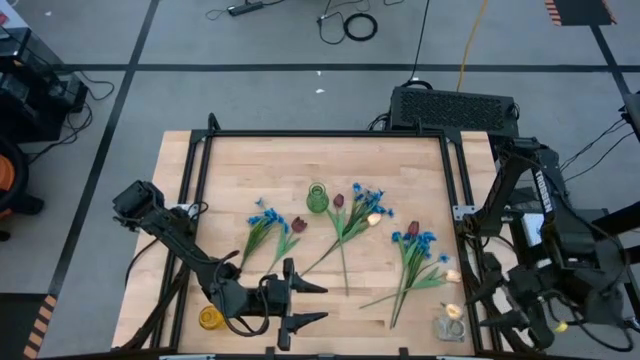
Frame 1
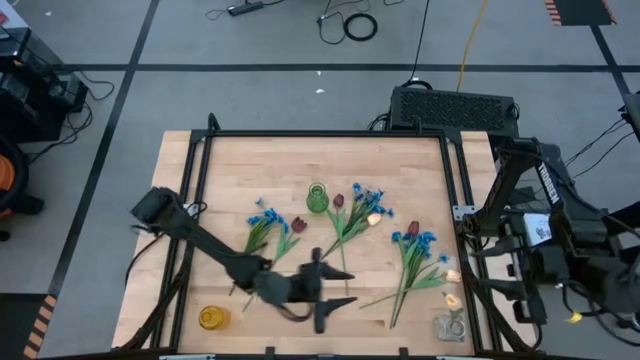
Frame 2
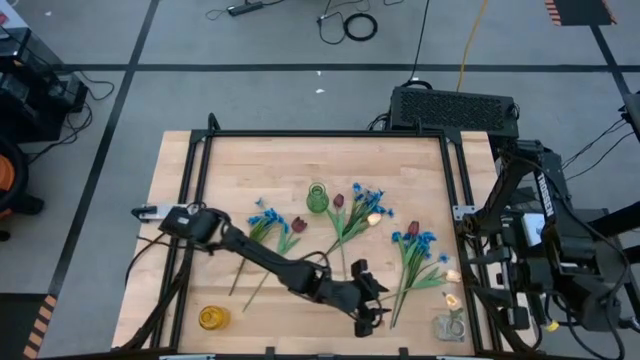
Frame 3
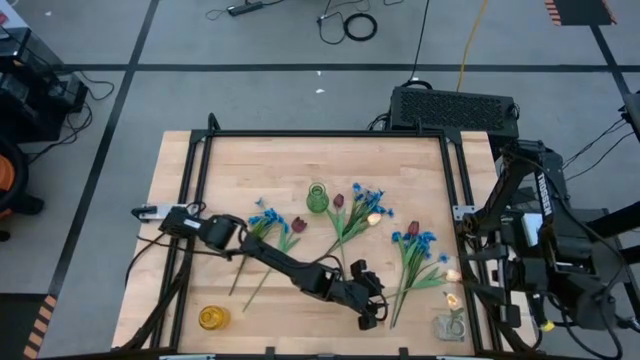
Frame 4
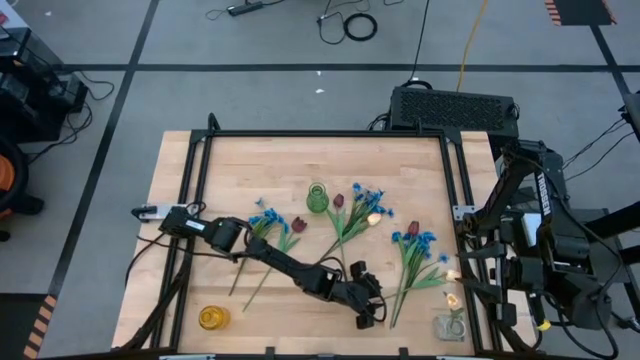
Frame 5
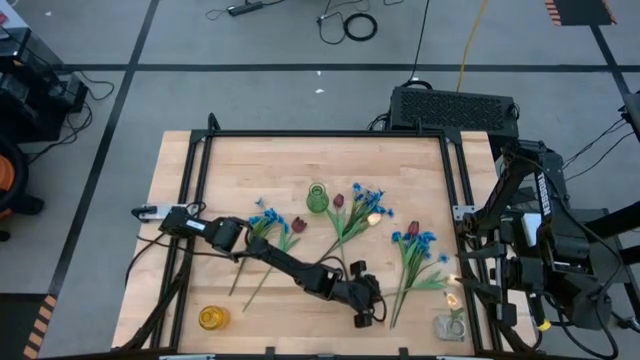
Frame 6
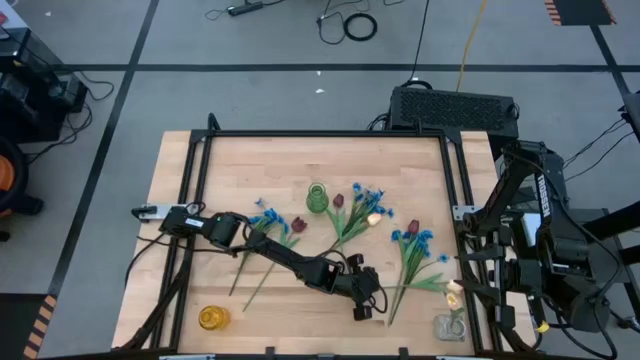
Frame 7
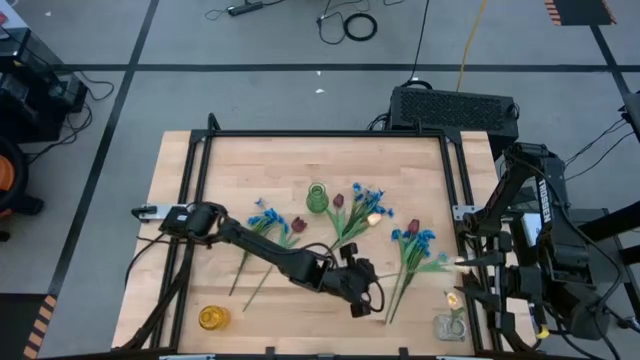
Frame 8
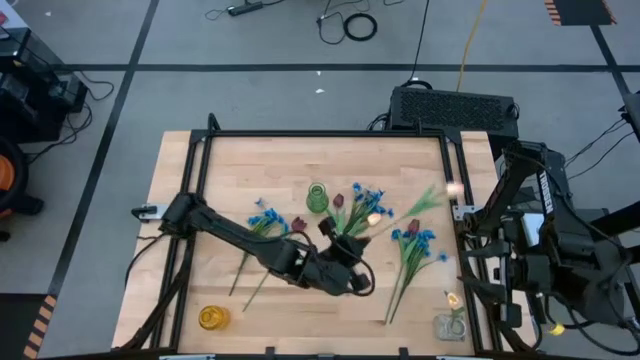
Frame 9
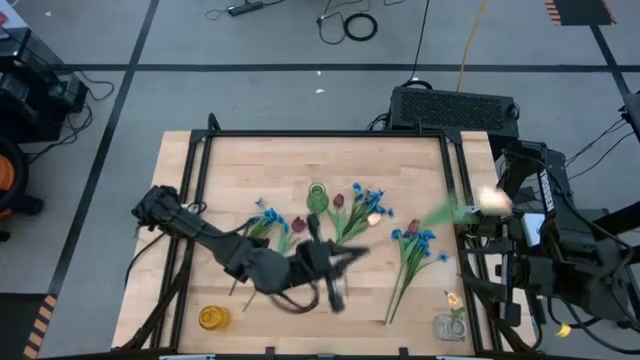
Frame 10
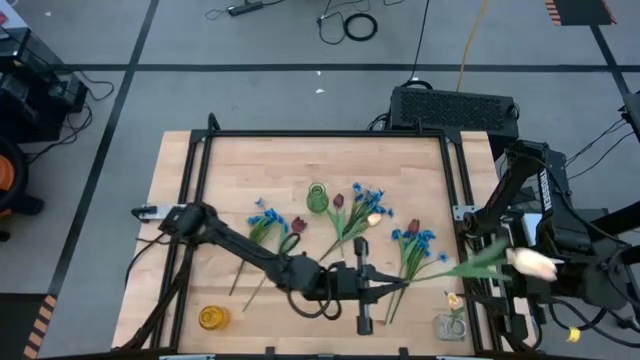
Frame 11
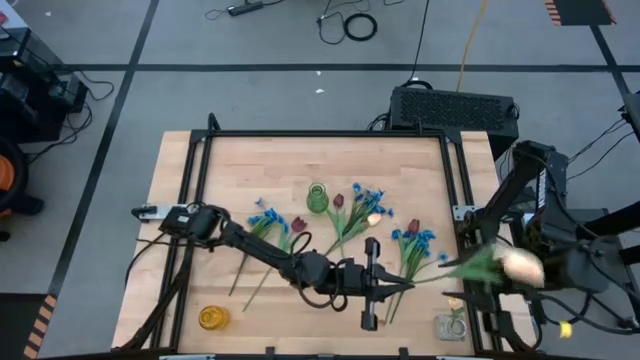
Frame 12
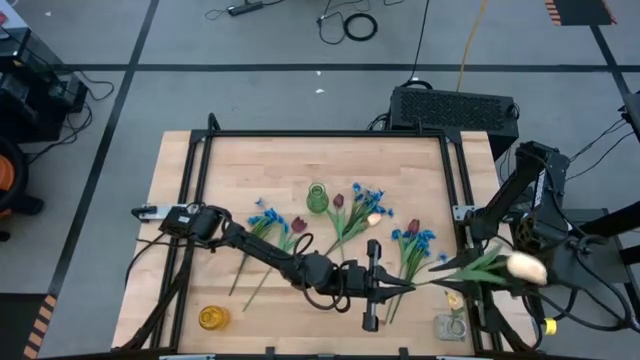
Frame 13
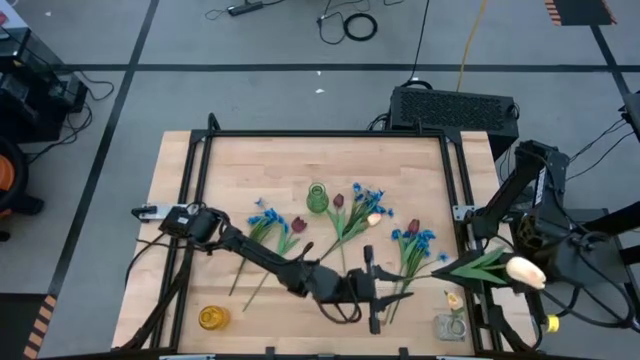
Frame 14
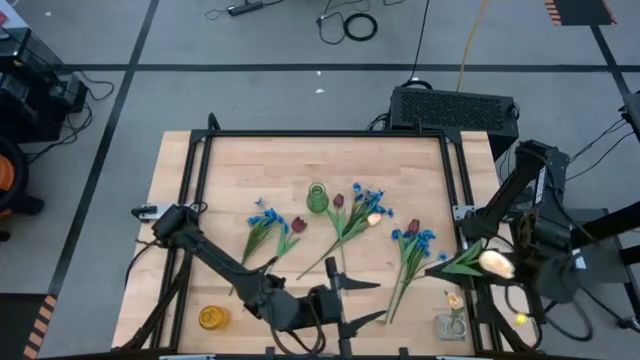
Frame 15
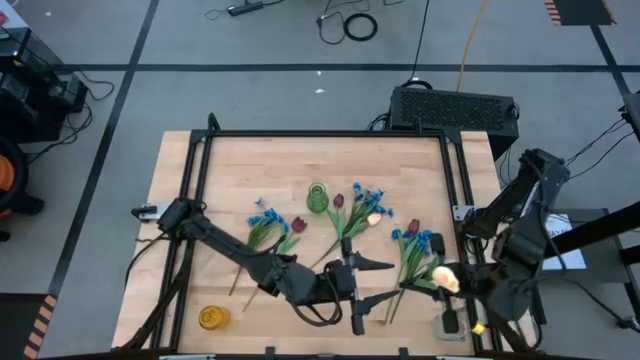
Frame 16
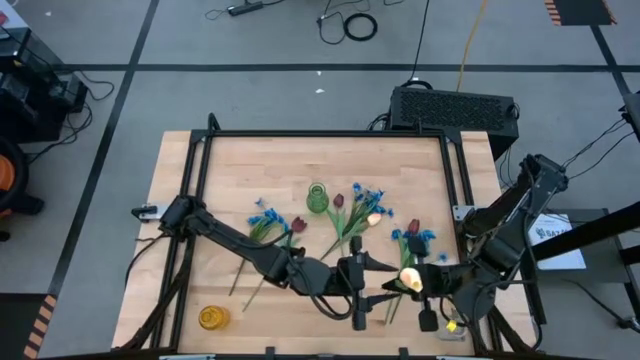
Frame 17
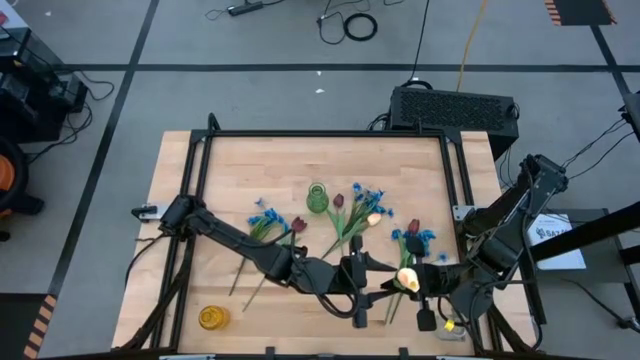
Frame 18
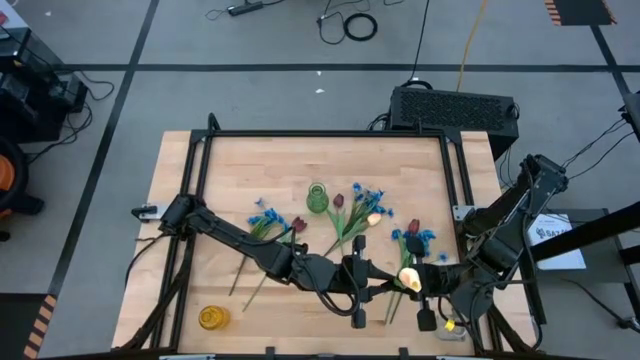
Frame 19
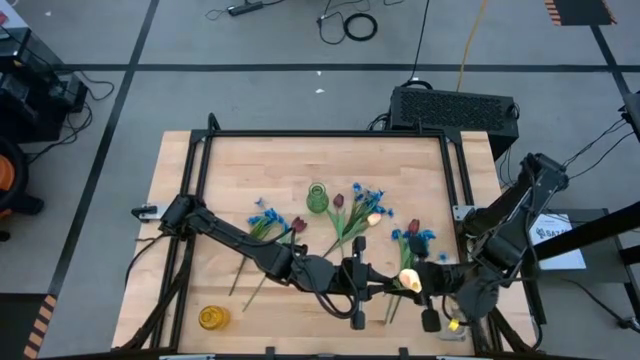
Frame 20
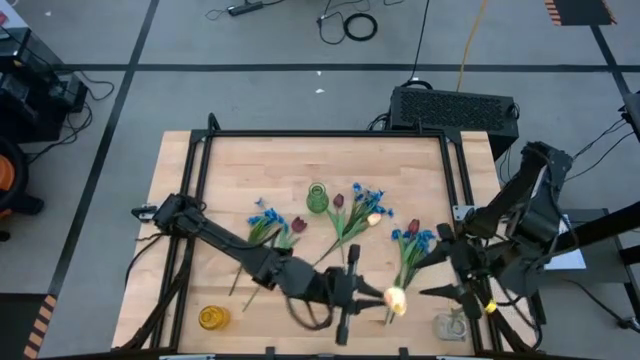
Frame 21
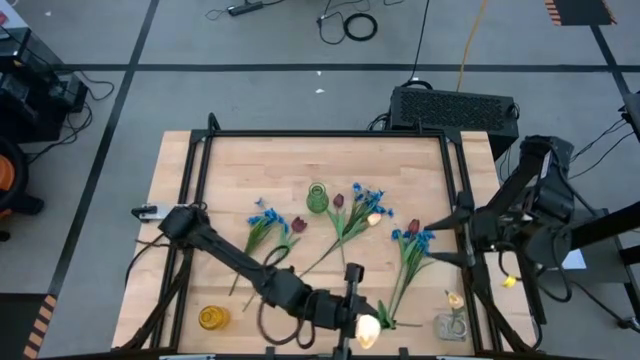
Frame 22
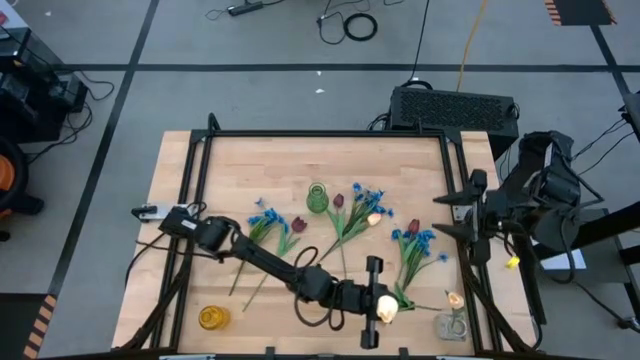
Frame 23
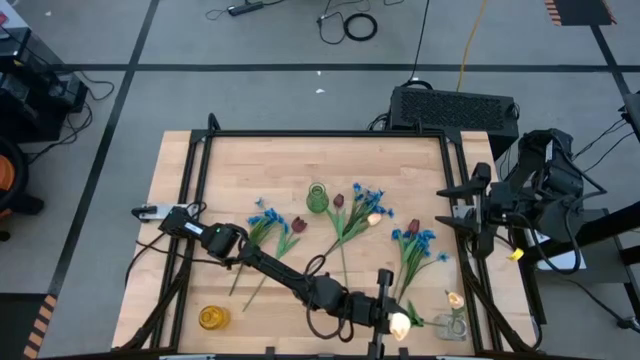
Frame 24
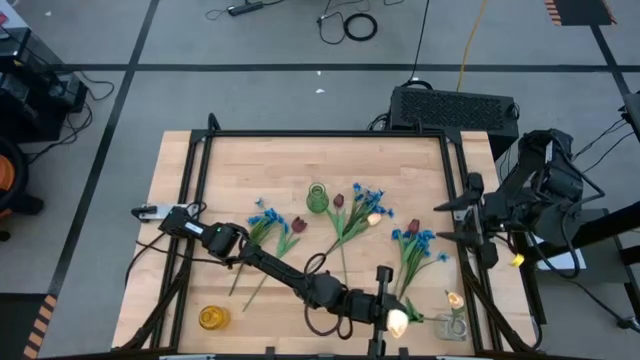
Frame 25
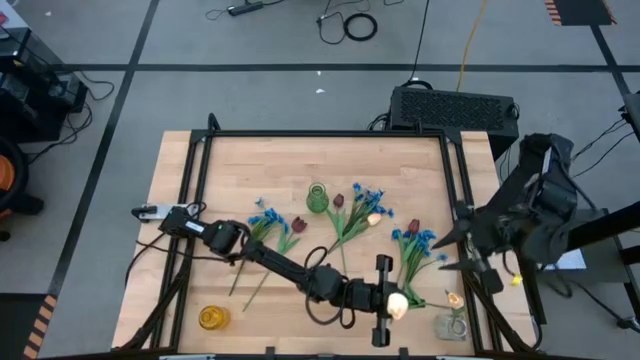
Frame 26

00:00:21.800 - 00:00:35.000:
Task: Sort flowers into vase by color
Put the bottom yellow flower into the transparent vase

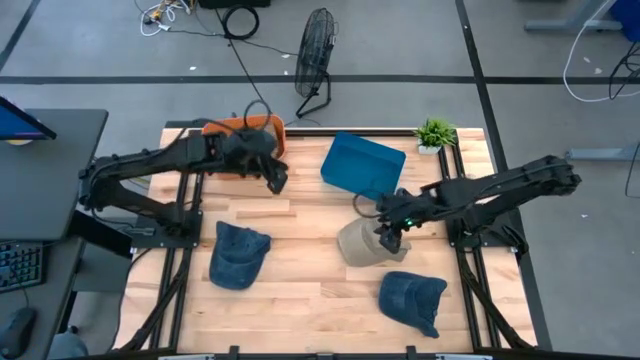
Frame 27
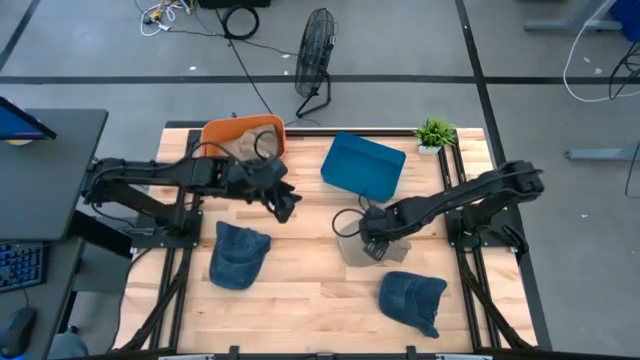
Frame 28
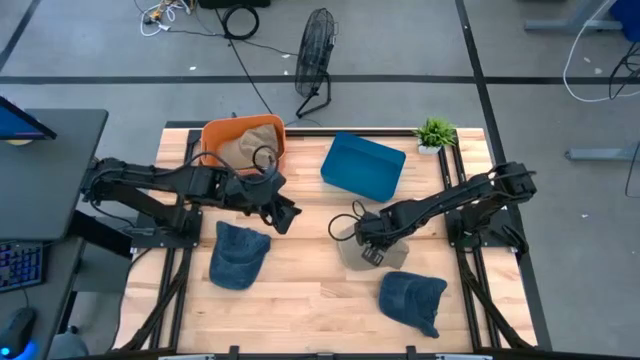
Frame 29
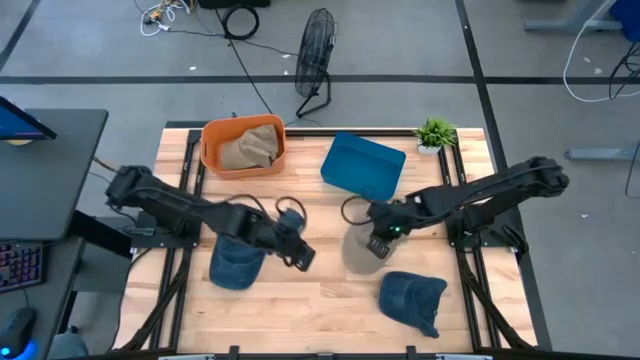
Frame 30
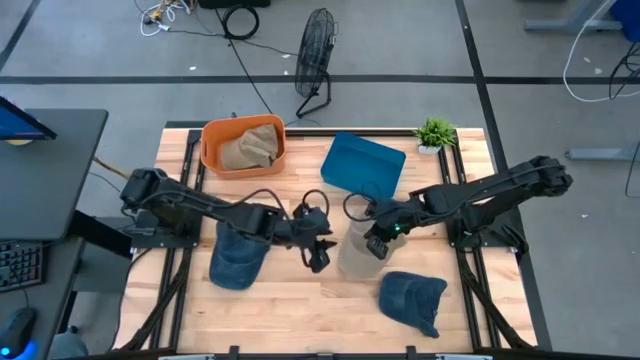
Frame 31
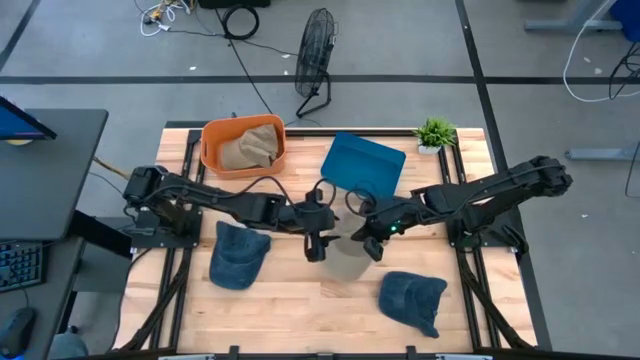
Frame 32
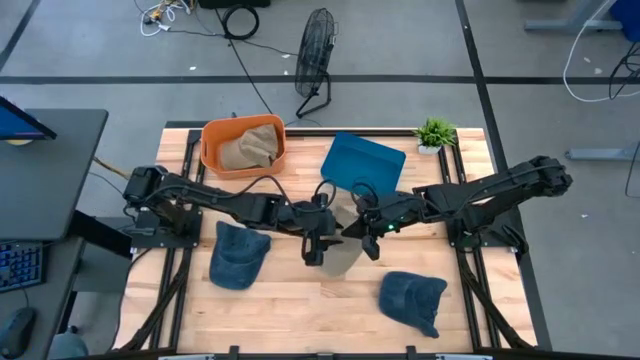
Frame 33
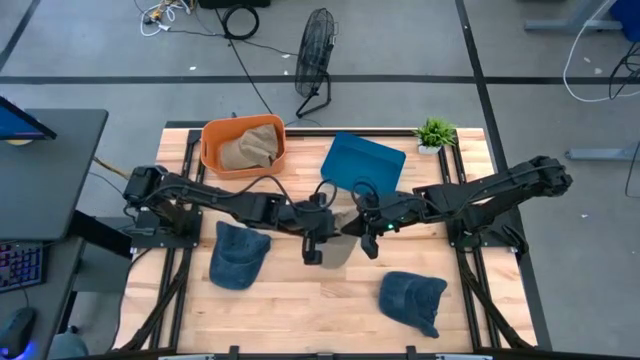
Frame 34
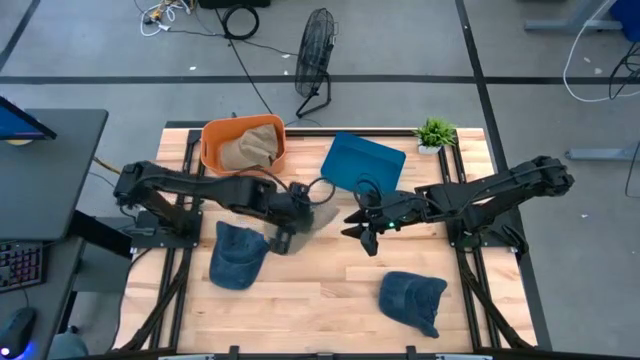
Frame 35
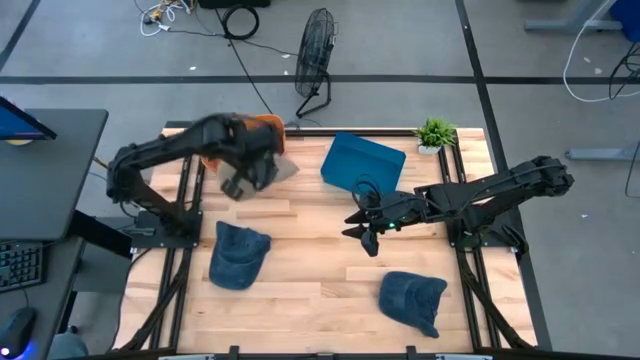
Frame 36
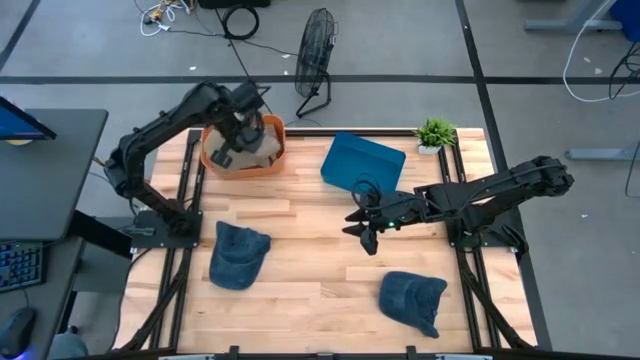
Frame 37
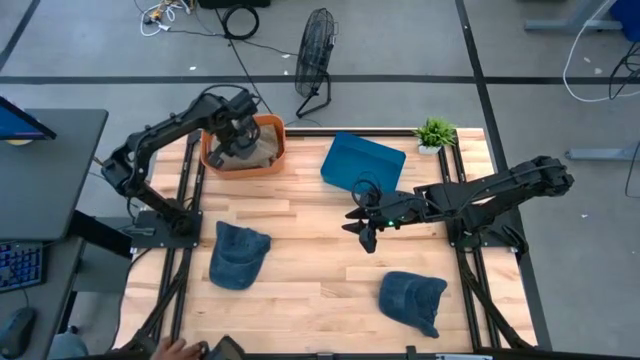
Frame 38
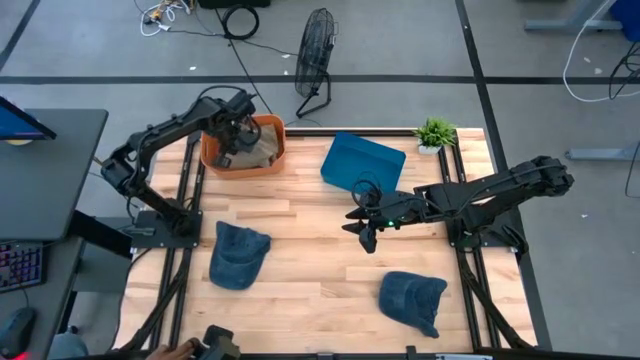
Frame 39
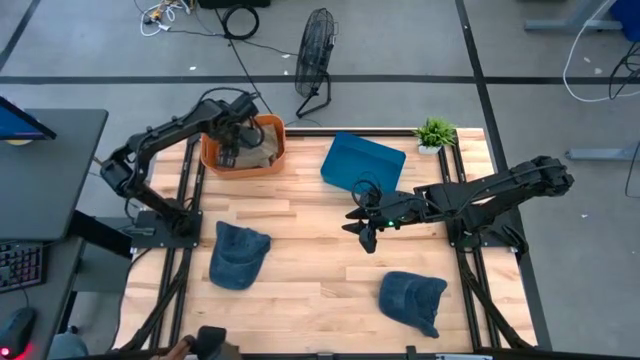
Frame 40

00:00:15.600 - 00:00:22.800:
Task: Pick & Place hat
Put the brown cap into the orange bin

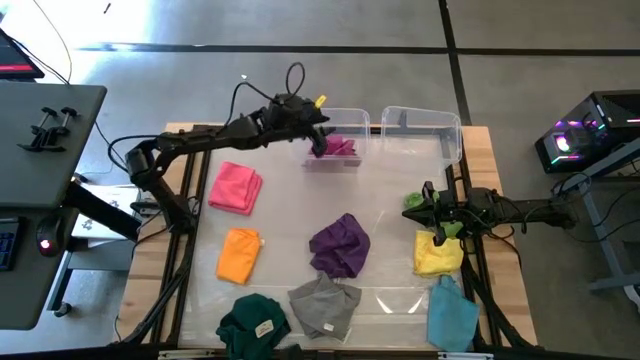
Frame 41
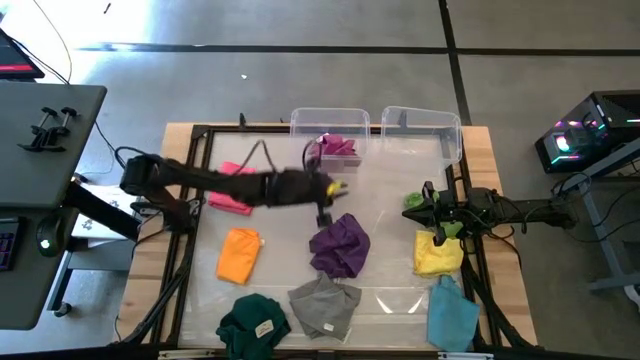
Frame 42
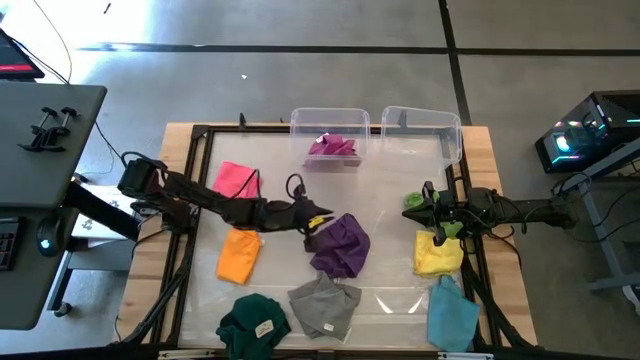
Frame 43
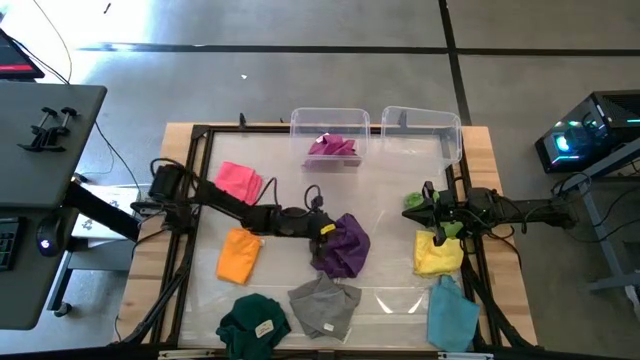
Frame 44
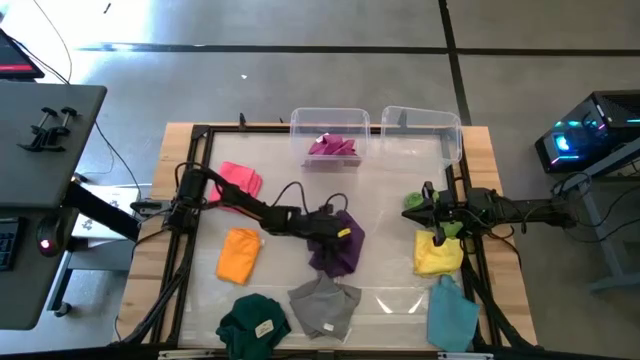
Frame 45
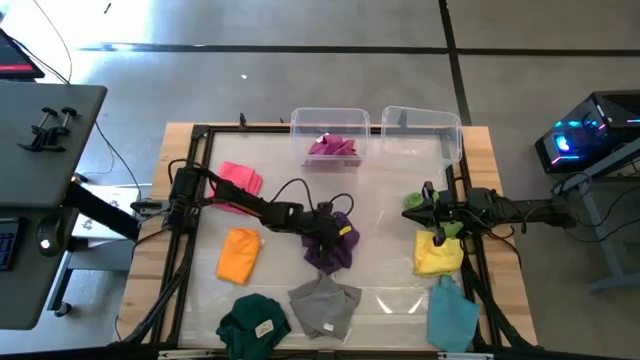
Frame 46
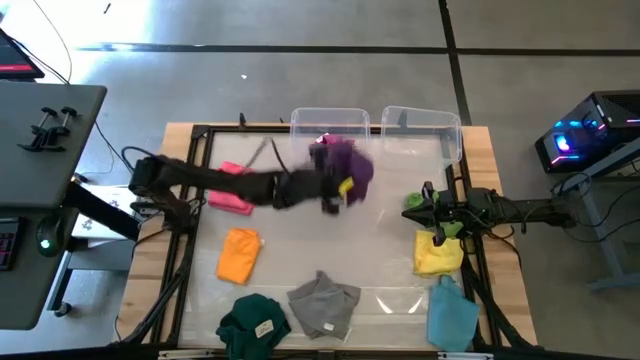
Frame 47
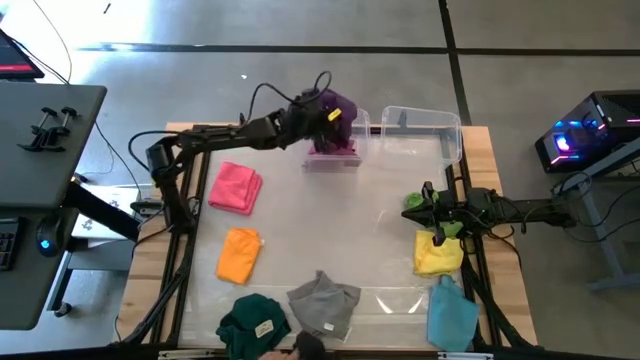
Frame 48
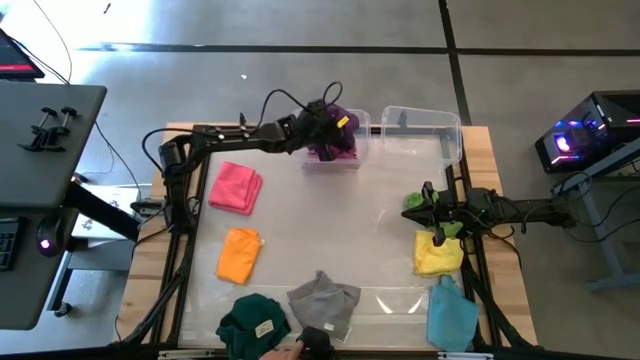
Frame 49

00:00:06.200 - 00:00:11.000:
Task: Sort towels by color in basket
Put the violet towel into the left transparent bin
